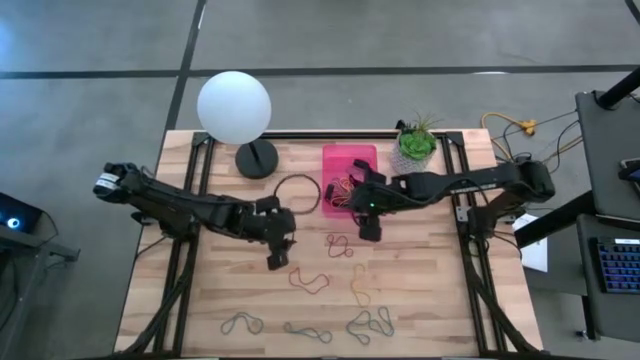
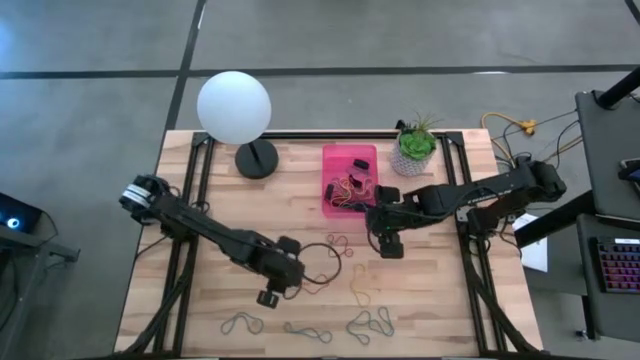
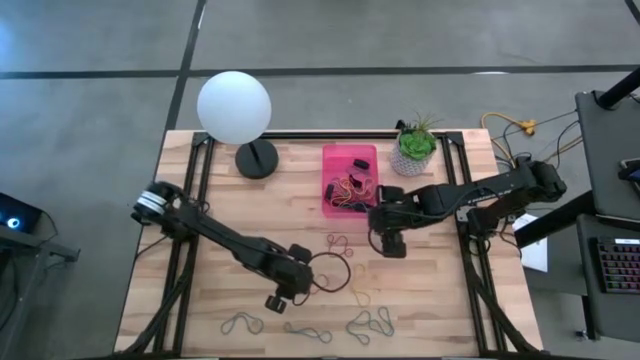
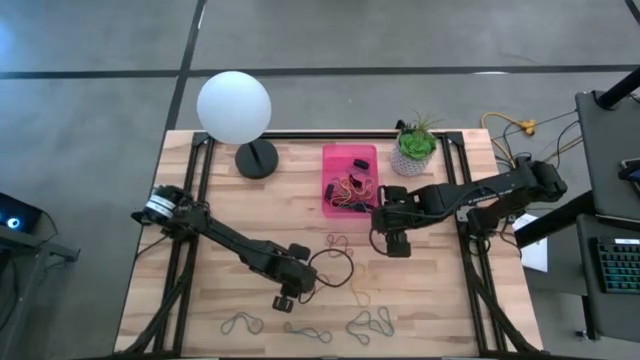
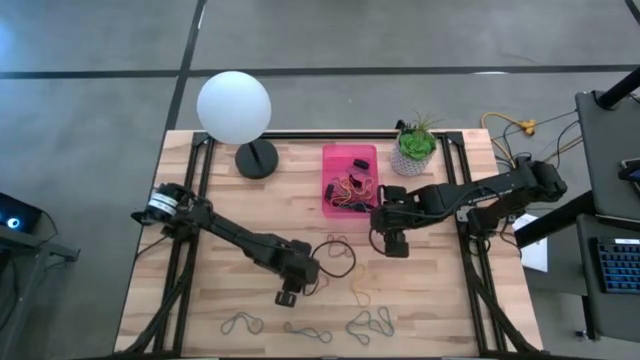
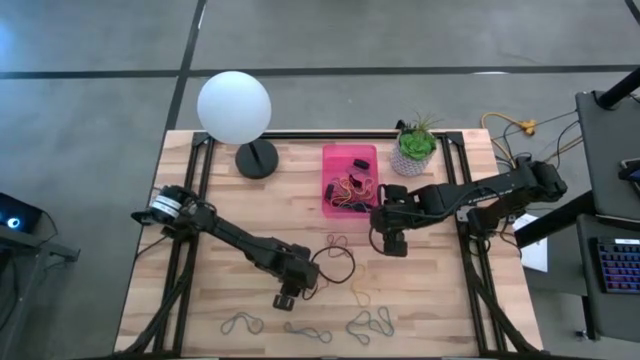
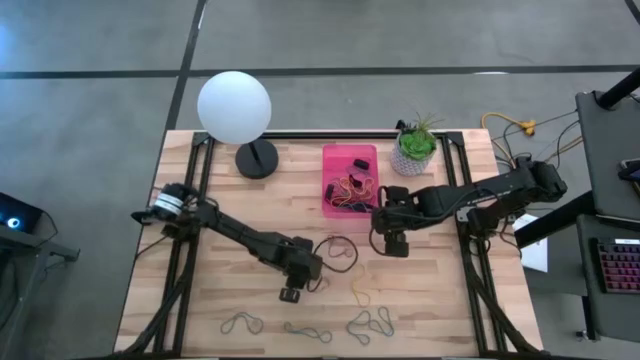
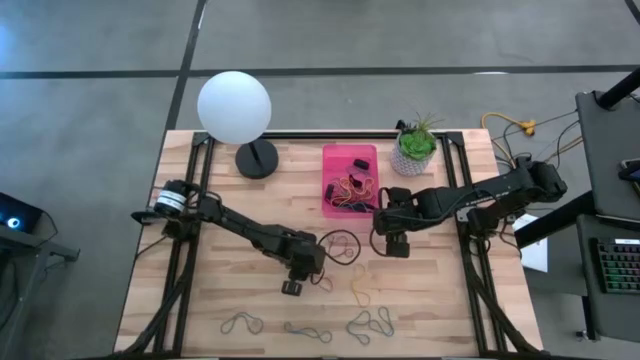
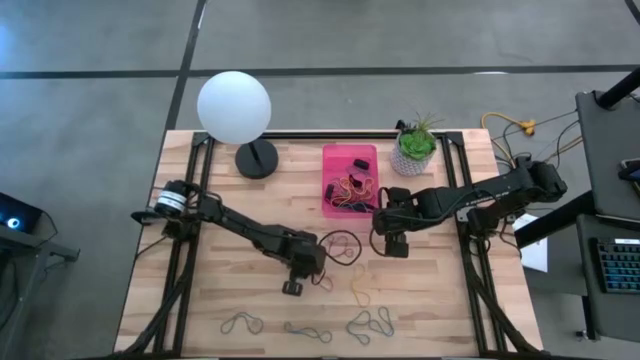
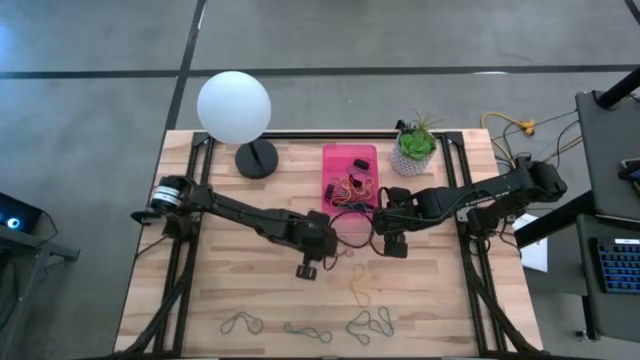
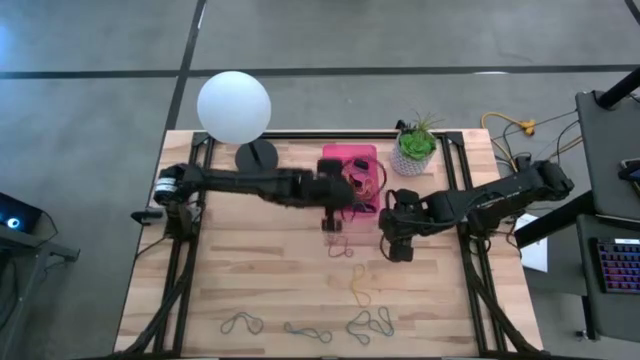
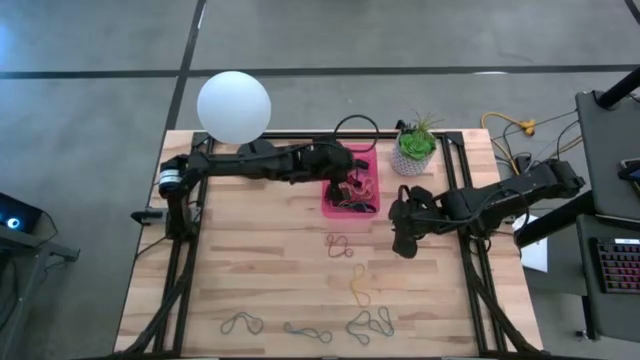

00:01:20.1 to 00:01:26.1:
Task: Pick and place rubber bands into bin
Put the red rubber band into the pink bin

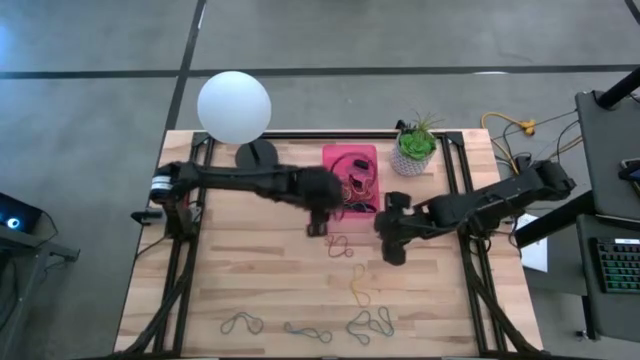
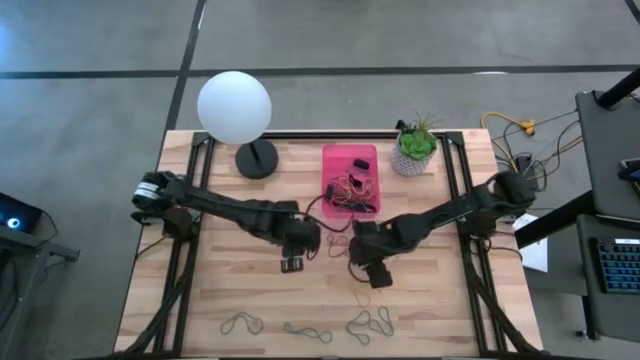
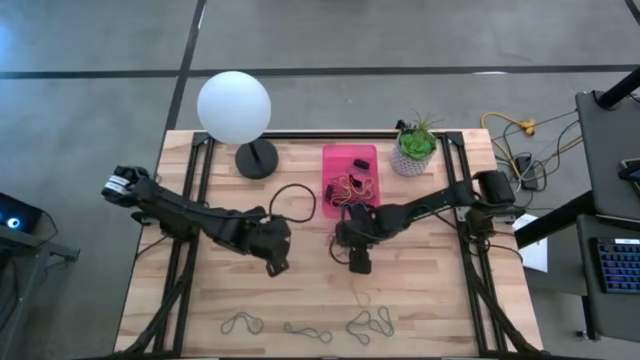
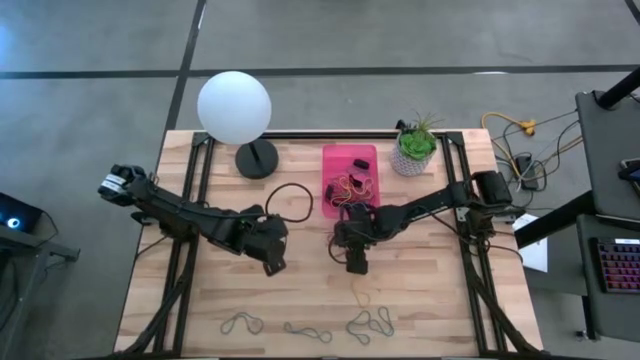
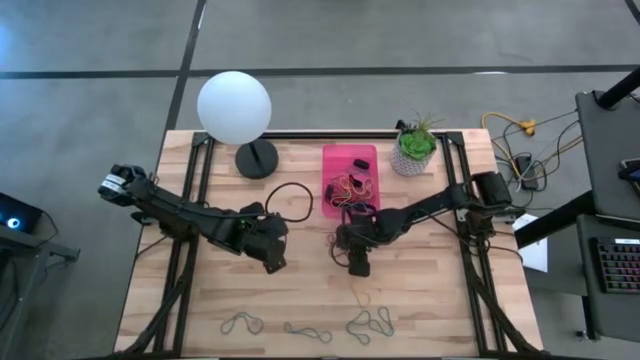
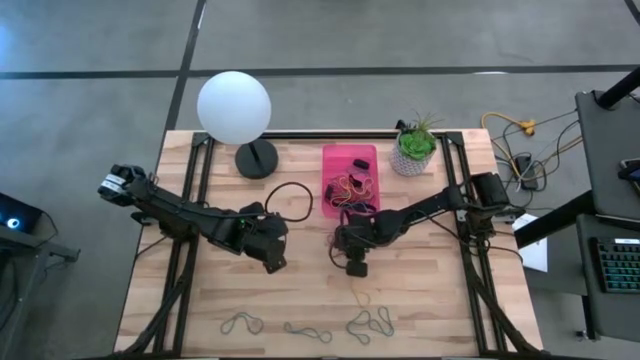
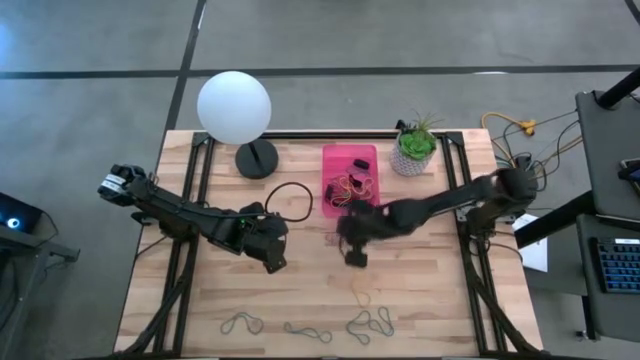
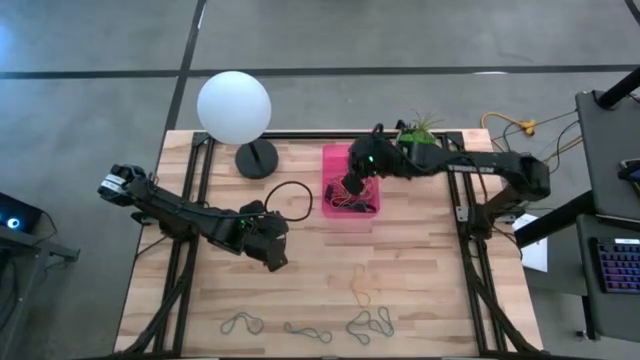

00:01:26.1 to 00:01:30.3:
Put the red rubber band into the pink bin

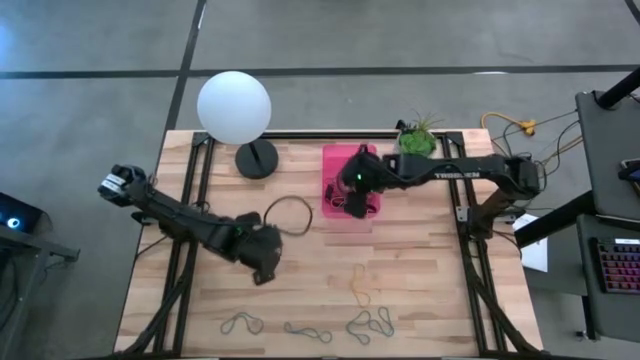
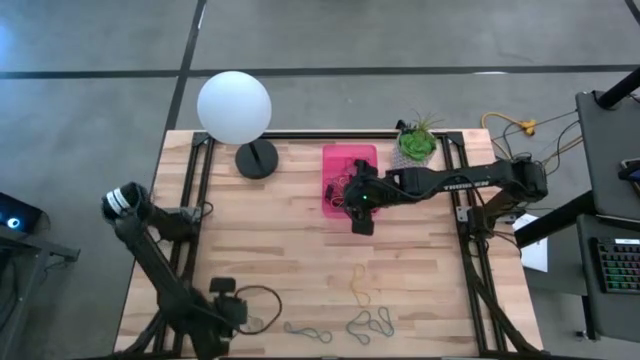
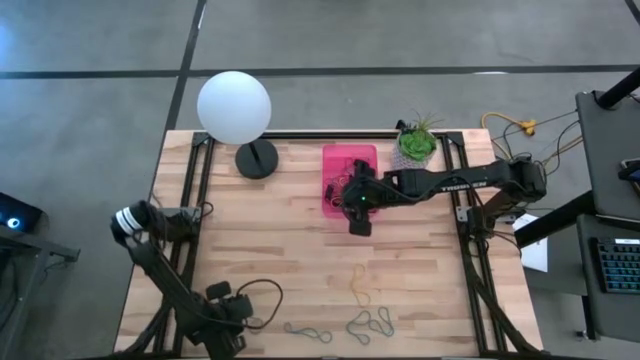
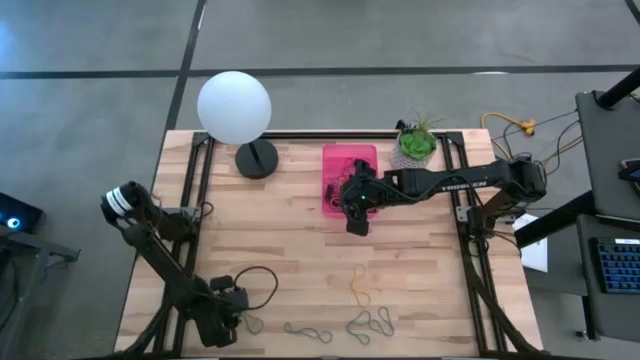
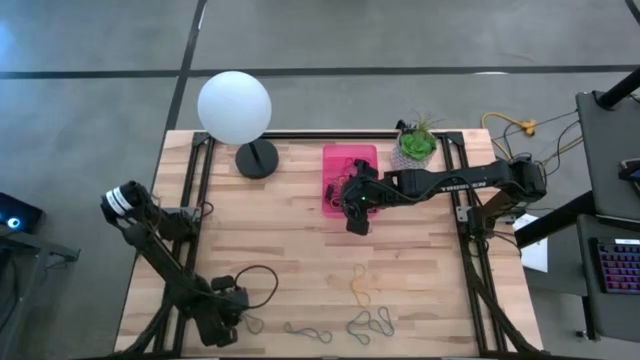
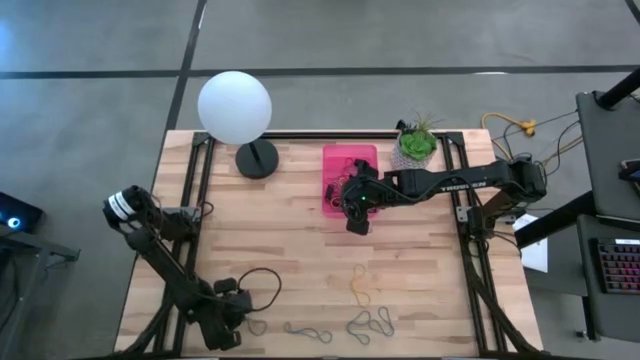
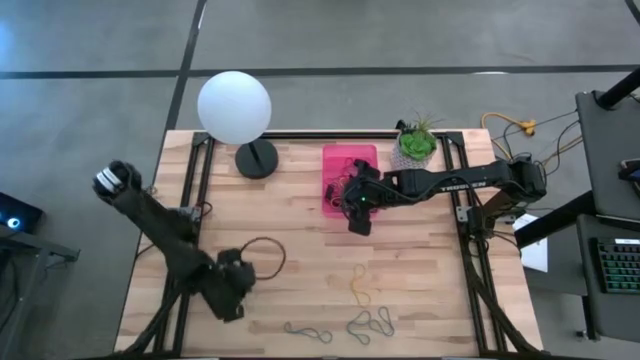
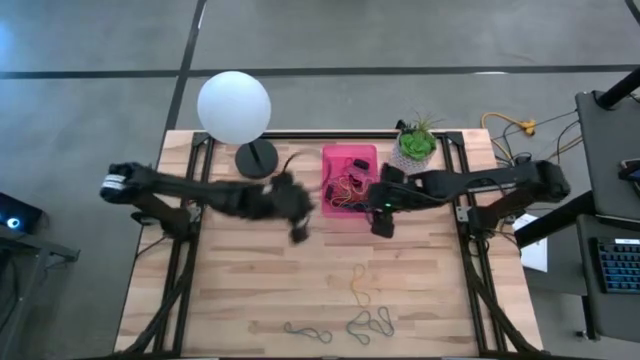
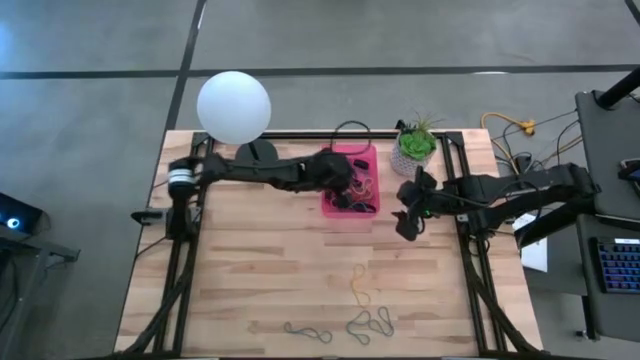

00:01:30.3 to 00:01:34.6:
Put the blue rubber band into the pink bin

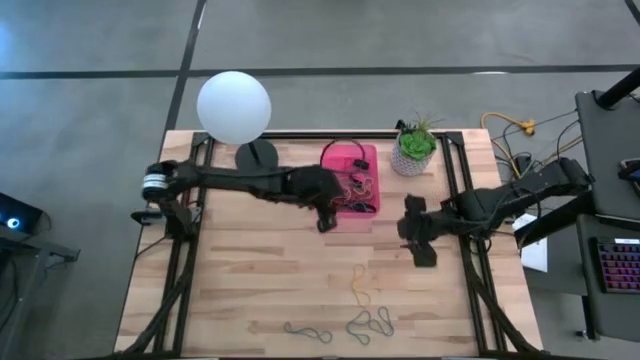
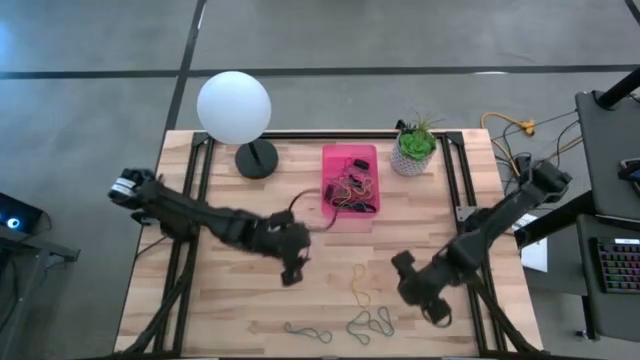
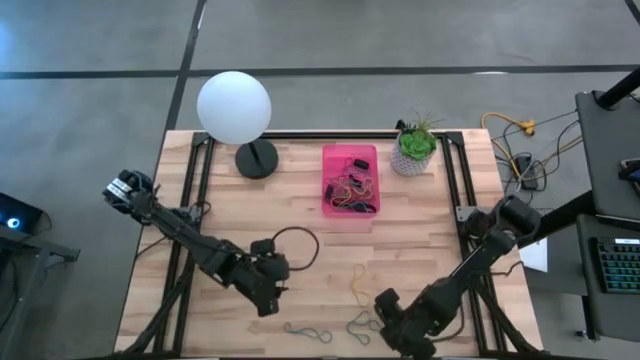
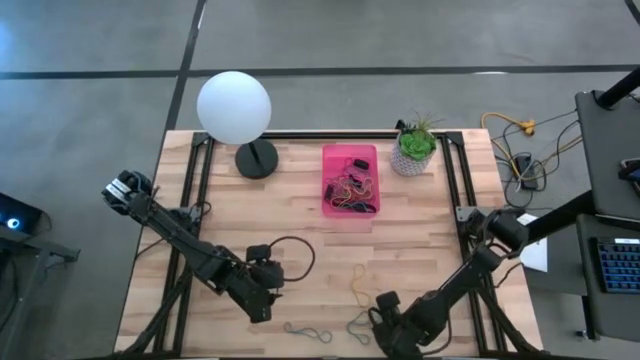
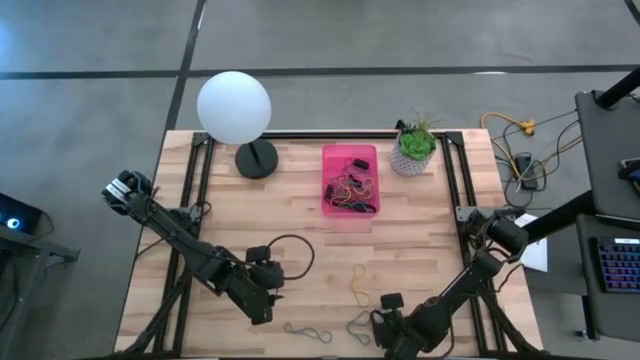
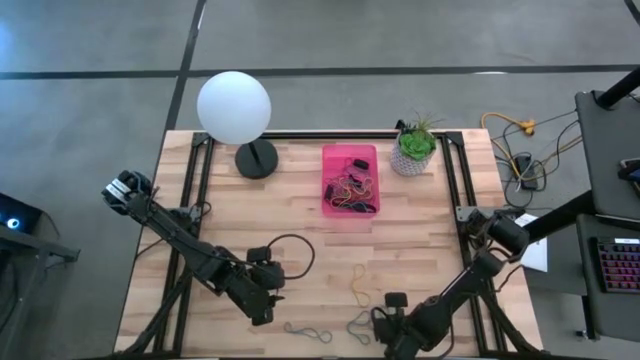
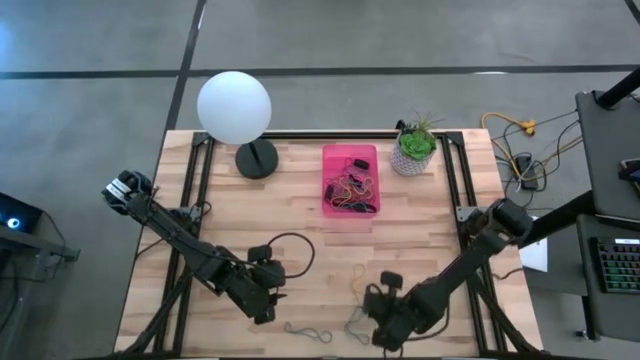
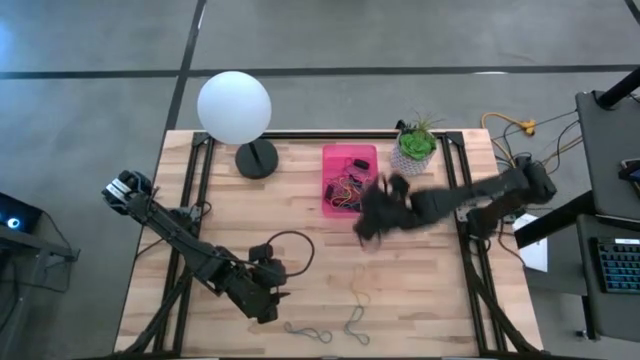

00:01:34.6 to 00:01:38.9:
Put the blue rubber band into the pink bin

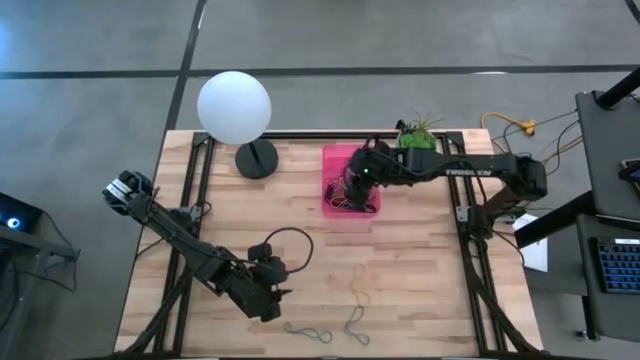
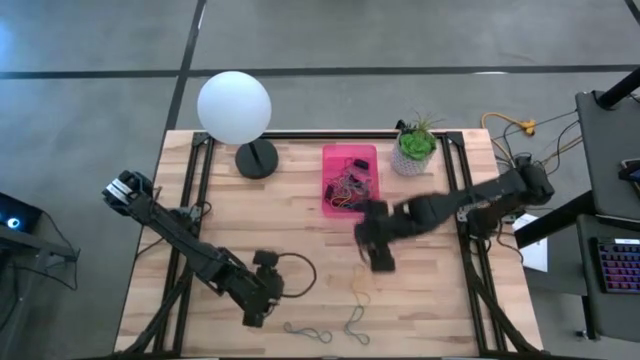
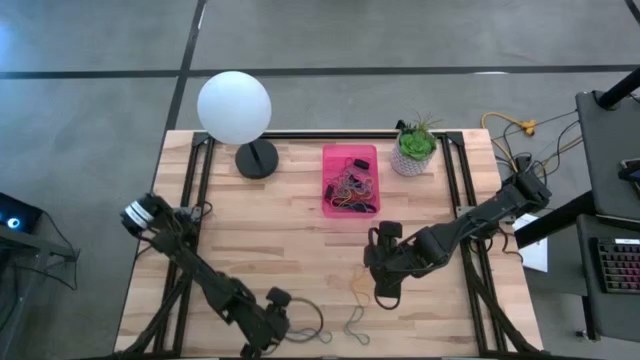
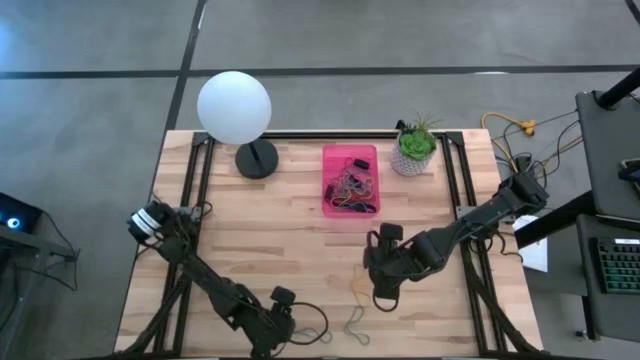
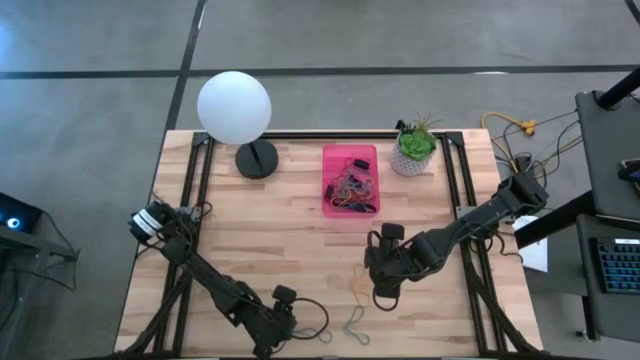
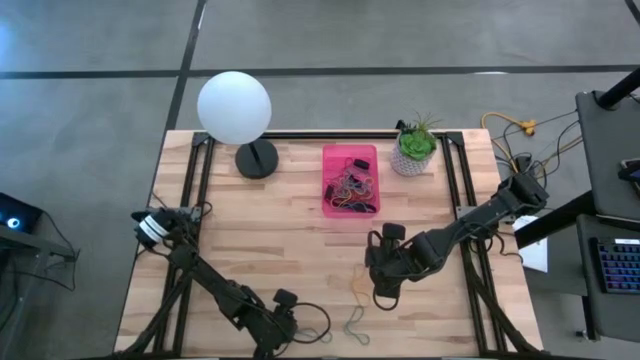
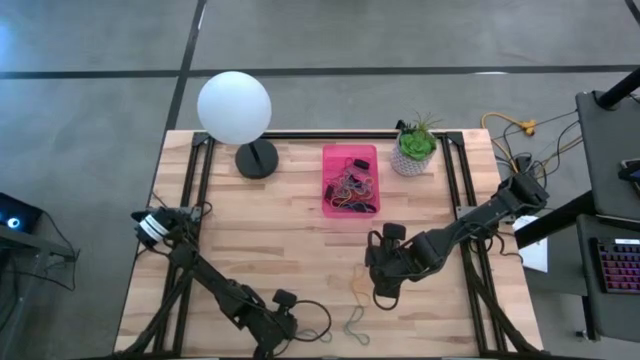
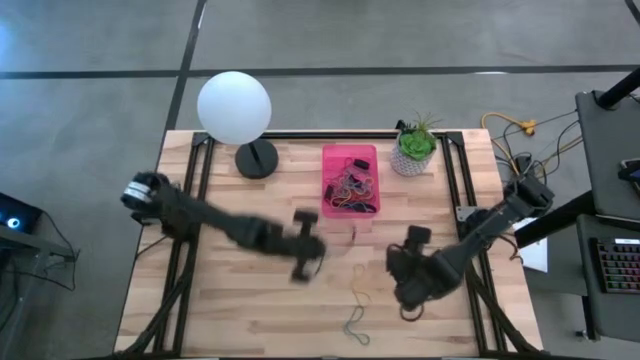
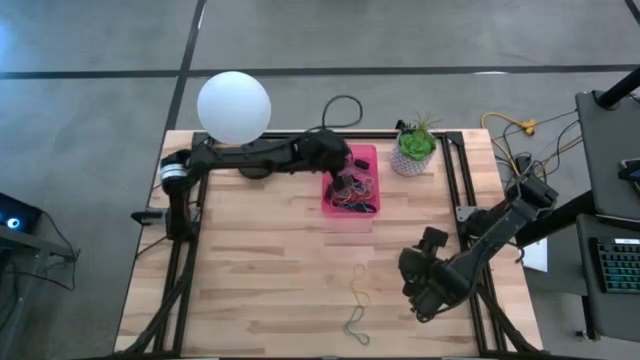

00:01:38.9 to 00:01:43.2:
Put the blue rubber band into the pink bin
